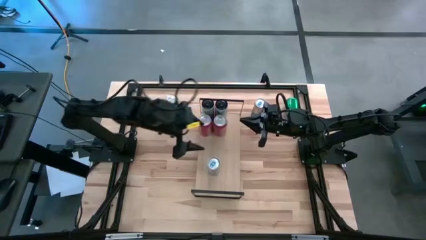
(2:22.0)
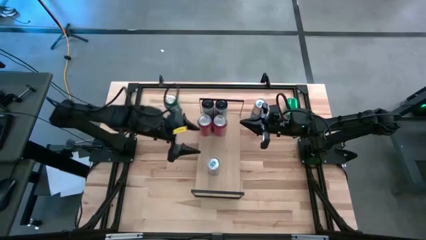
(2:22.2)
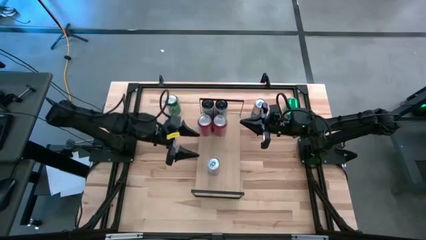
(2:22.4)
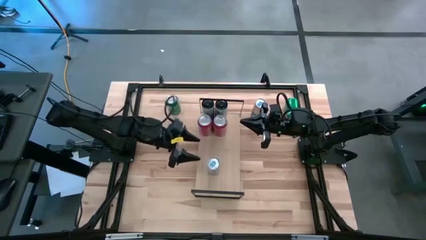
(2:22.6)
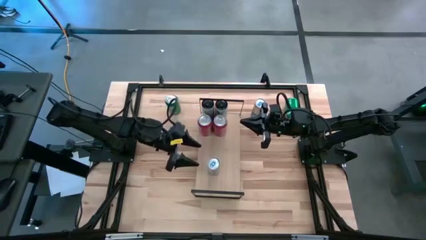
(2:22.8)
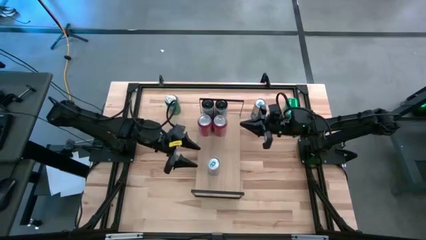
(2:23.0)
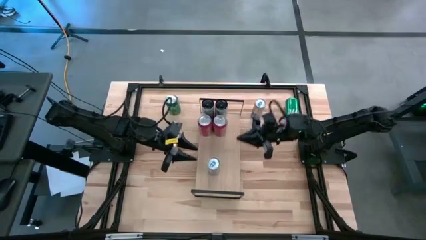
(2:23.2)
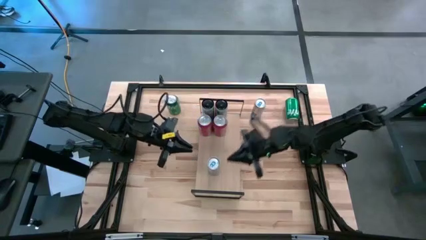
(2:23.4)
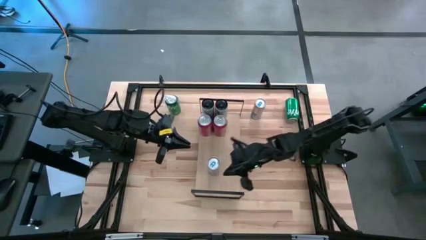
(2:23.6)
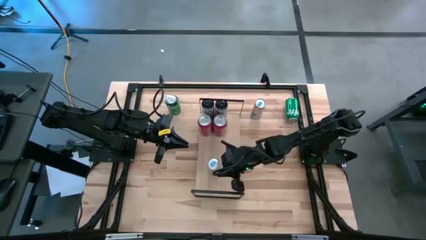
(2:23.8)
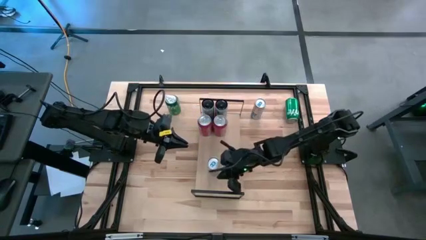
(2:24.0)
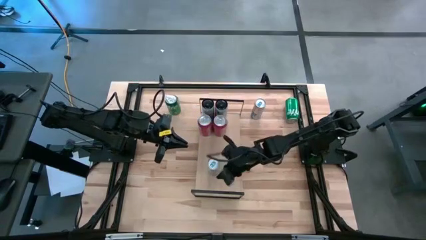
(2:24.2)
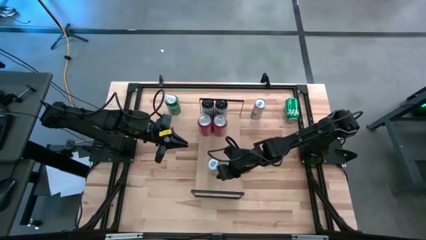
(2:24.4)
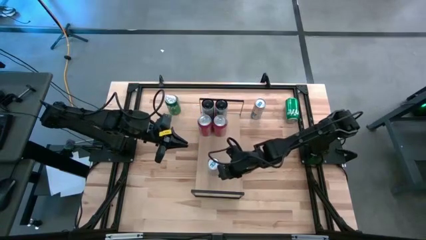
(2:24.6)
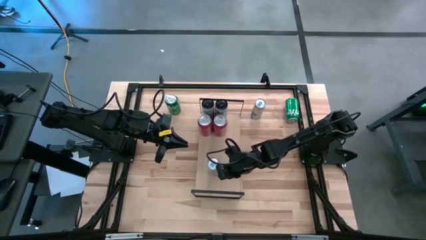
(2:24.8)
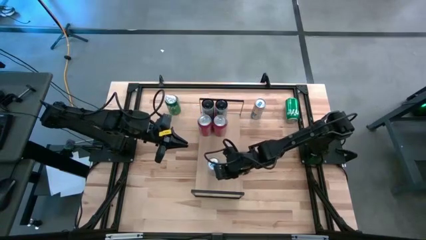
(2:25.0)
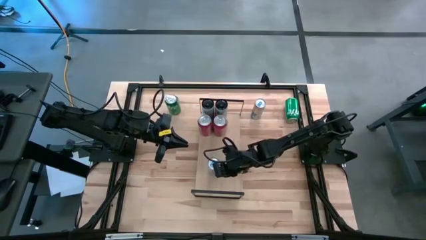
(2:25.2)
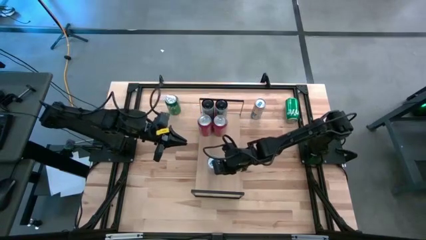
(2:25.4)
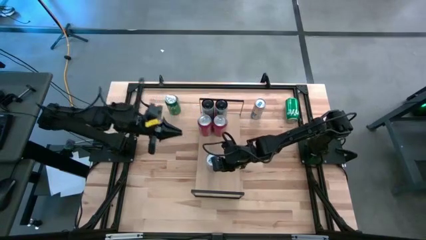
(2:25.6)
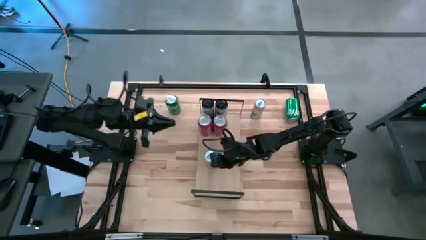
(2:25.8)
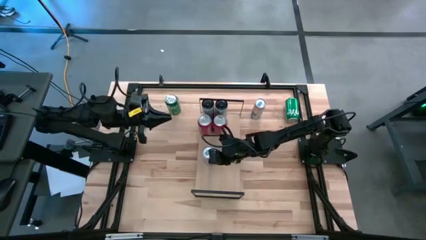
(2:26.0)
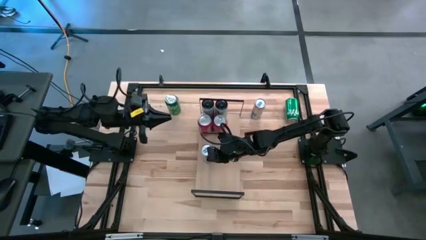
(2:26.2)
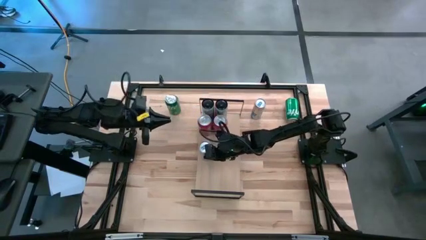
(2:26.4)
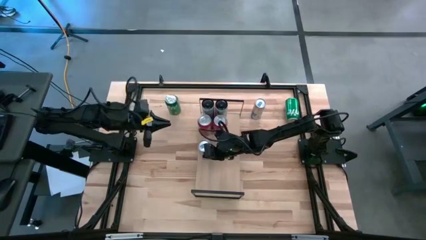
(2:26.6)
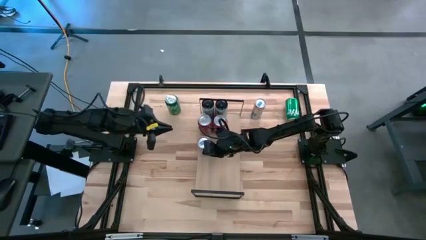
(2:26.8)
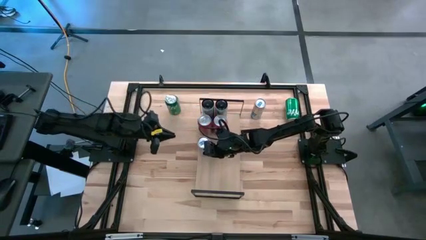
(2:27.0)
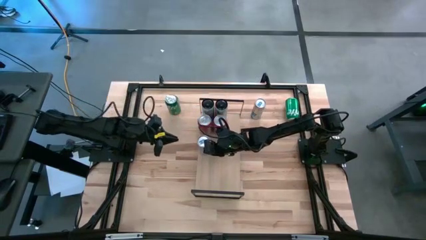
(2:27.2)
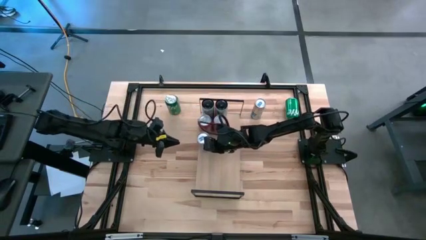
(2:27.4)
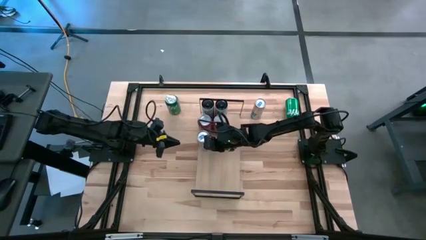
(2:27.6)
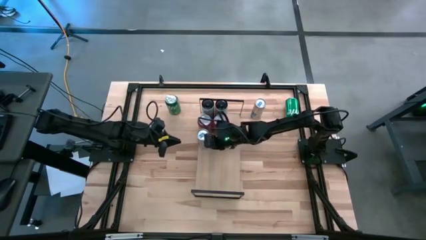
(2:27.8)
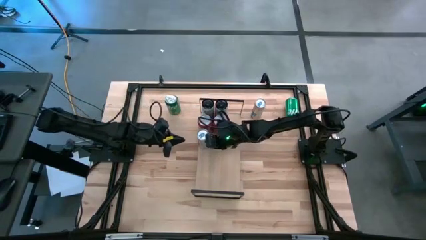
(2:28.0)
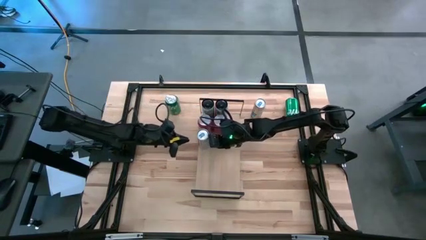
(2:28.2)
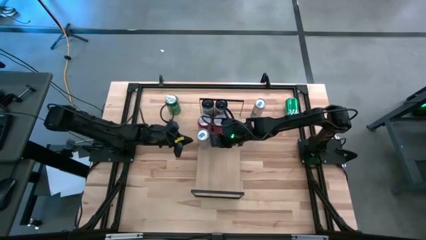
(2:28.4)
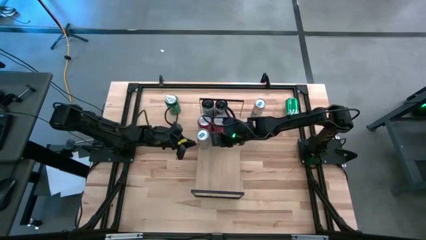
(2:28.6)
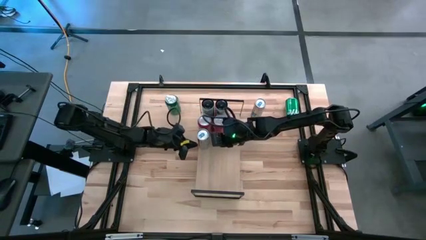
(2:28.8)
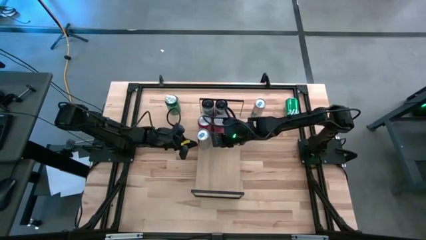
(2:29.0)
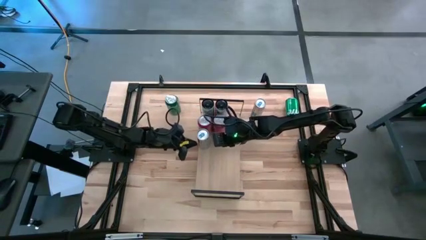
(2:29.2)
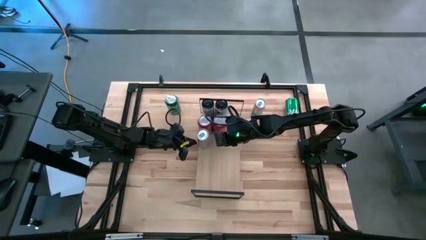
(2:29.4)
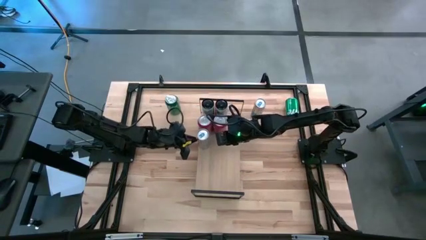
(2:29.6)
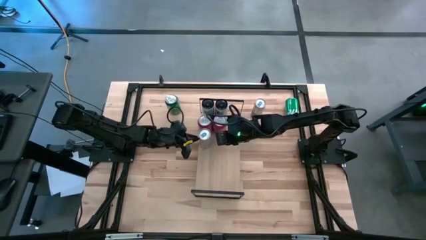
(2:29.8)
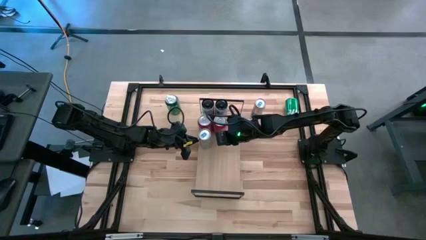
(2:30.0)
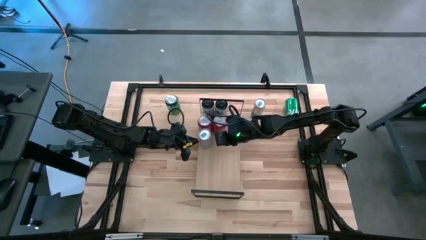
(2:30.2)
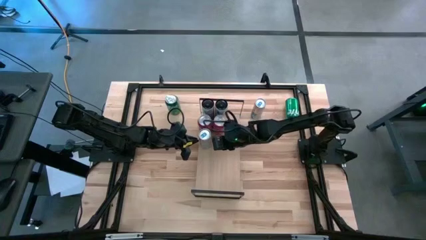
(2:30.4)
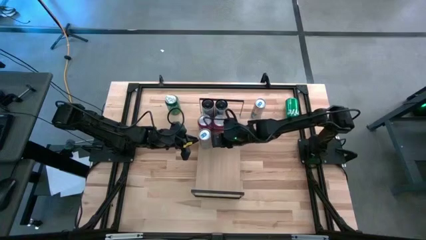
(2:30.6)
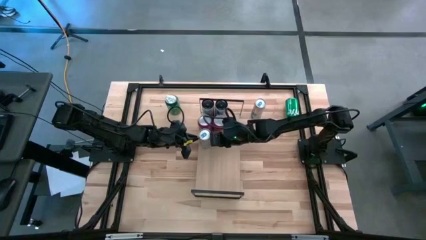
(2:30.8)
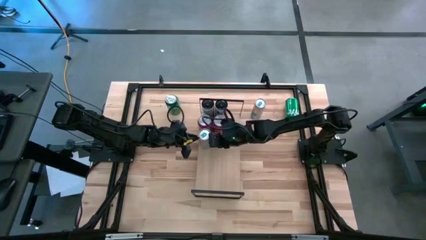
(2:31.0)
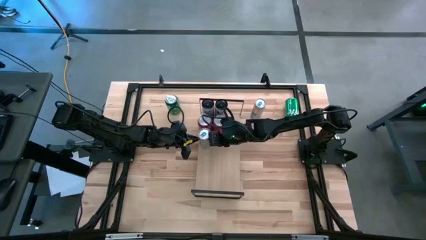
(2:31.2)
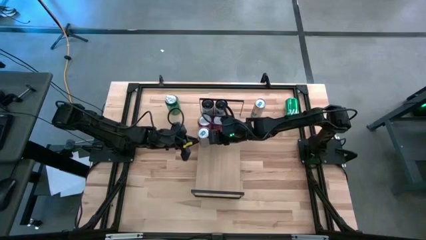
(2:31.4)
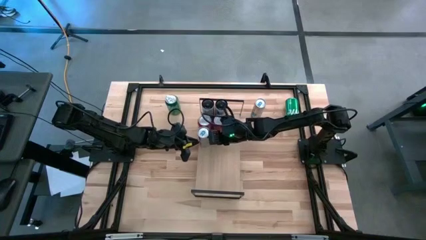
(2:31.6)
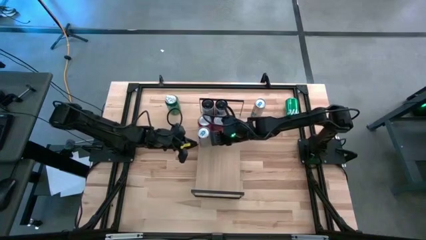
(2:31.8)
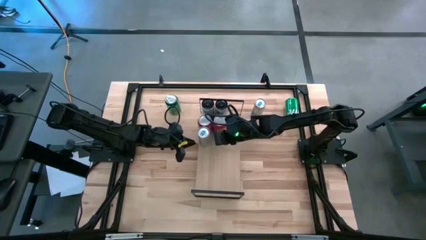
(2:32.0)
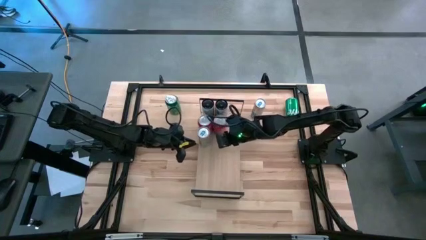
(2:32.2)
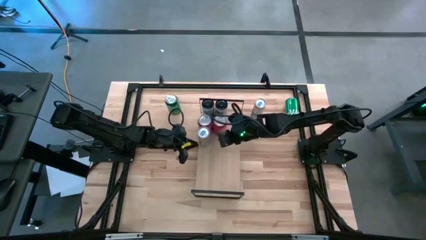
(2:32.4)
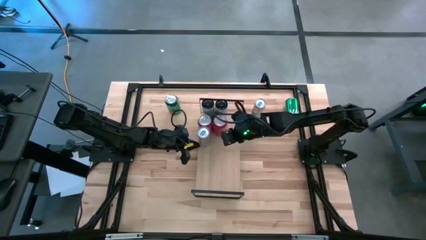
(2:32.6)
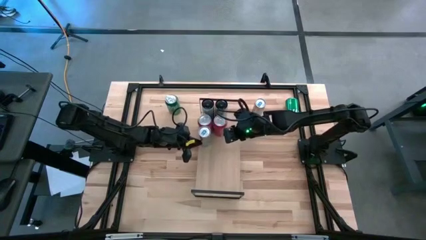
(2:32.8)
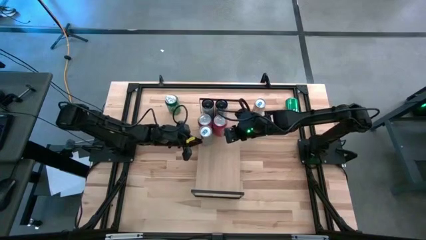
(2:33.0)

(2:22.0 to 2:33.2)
Task: Place canned beverage on shelf
Put the left blue soda can on the shelf
